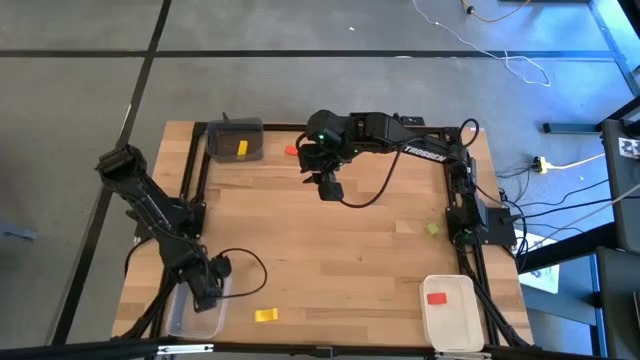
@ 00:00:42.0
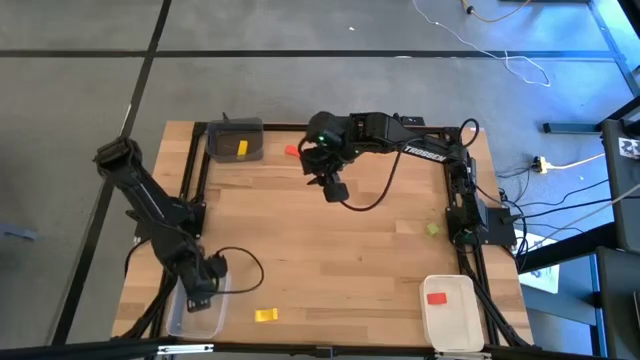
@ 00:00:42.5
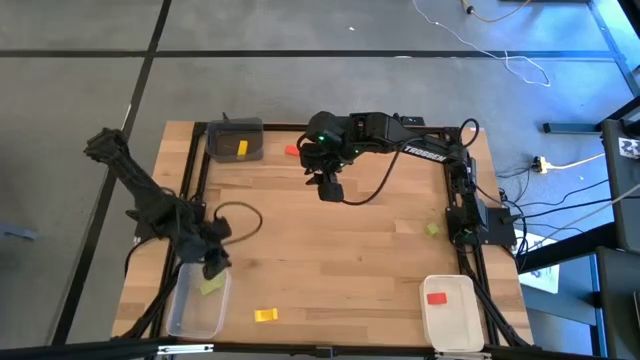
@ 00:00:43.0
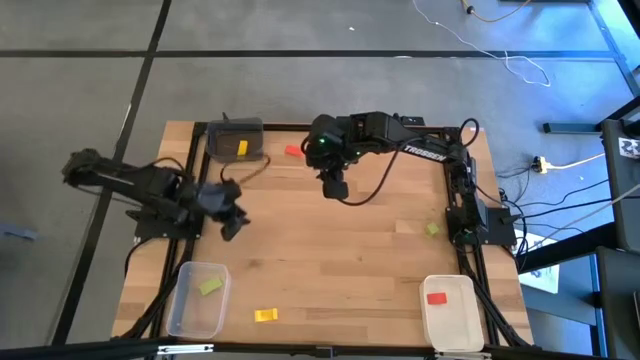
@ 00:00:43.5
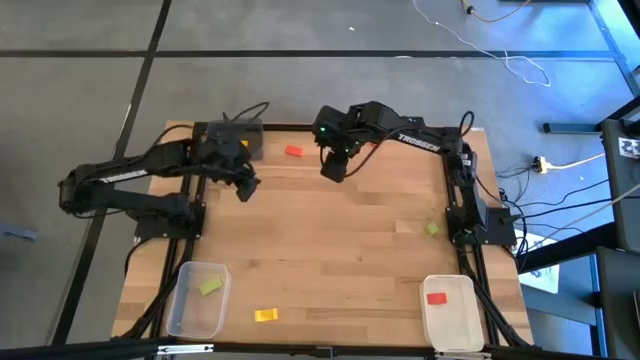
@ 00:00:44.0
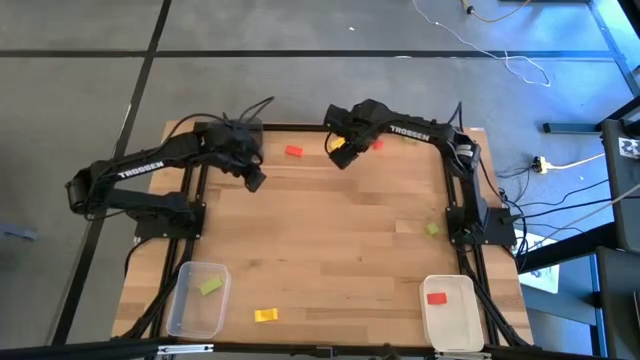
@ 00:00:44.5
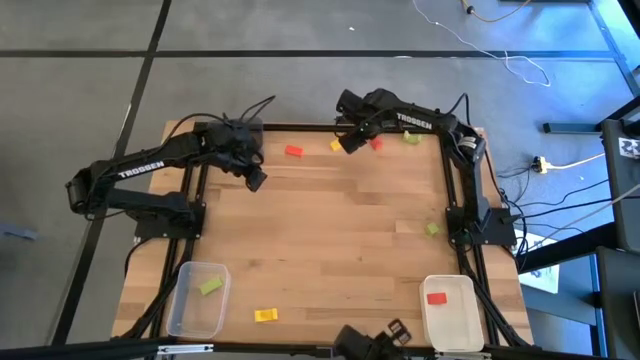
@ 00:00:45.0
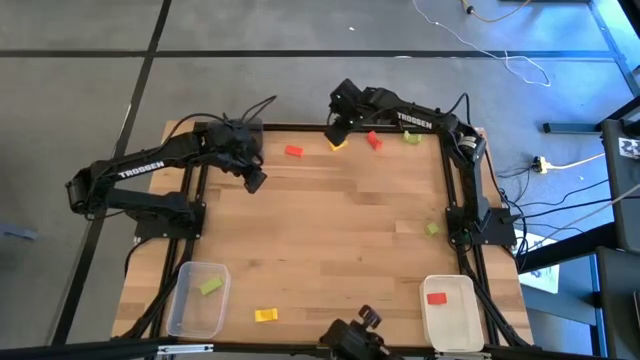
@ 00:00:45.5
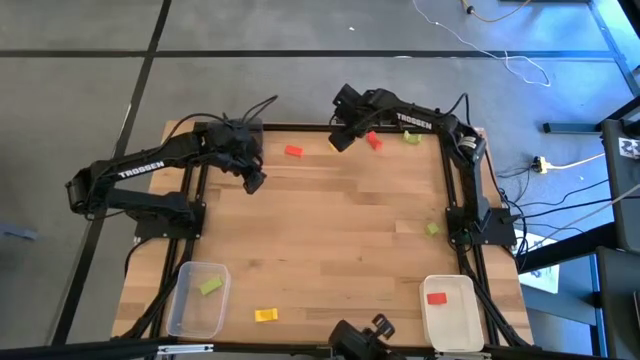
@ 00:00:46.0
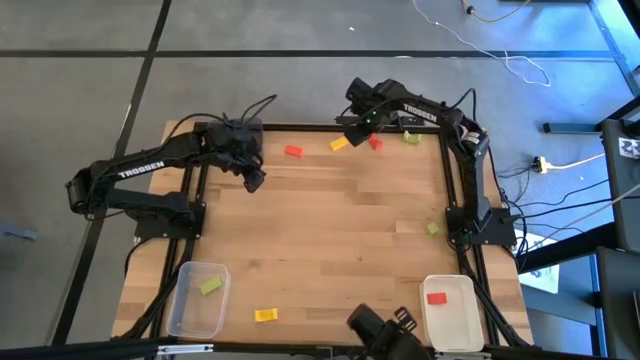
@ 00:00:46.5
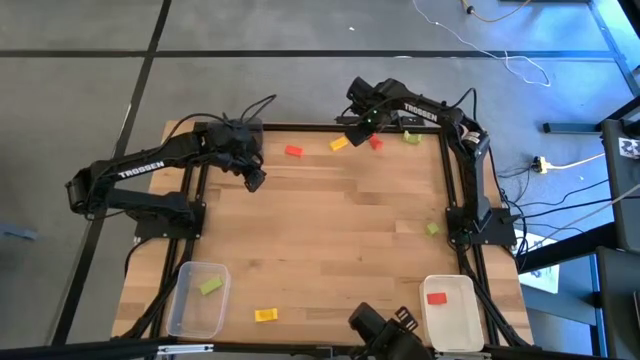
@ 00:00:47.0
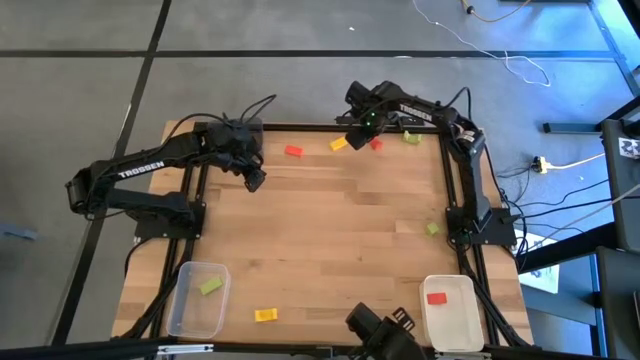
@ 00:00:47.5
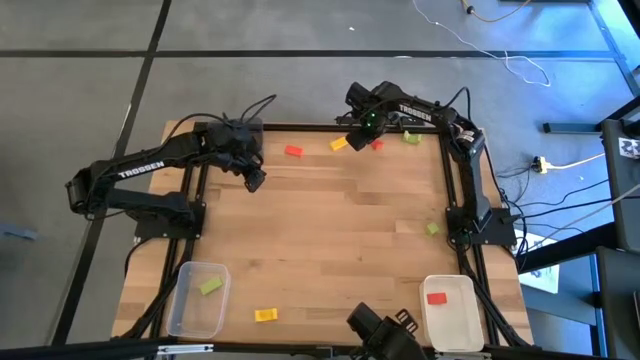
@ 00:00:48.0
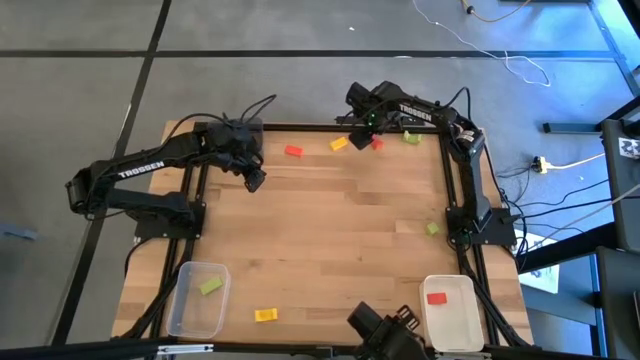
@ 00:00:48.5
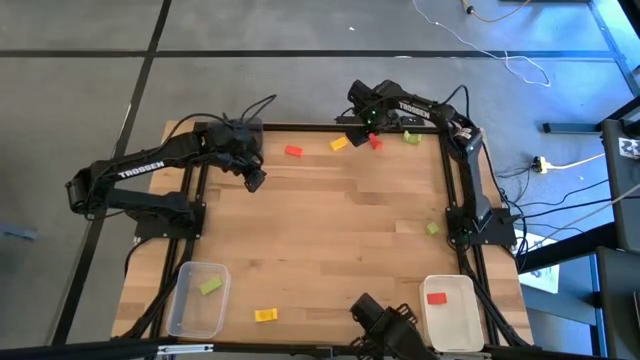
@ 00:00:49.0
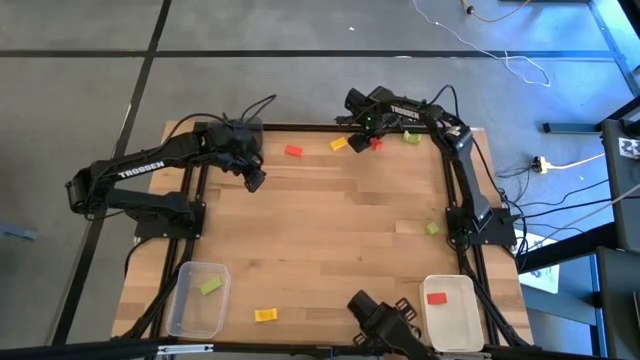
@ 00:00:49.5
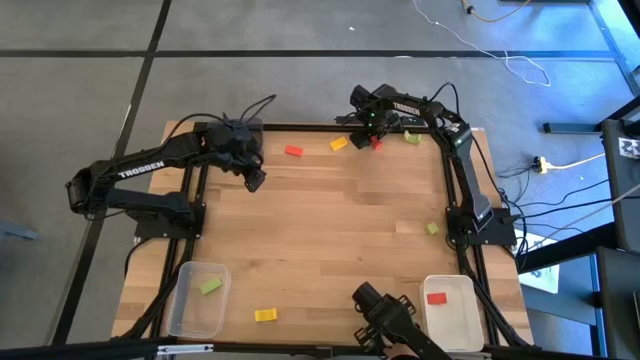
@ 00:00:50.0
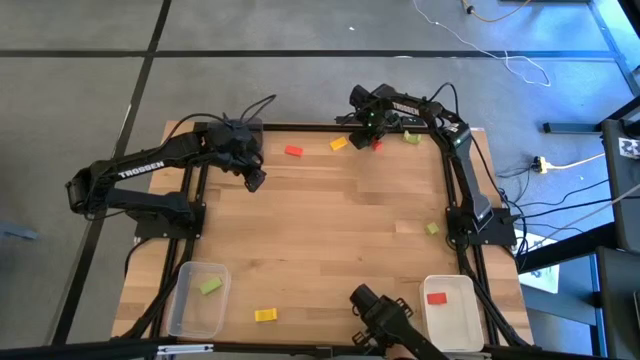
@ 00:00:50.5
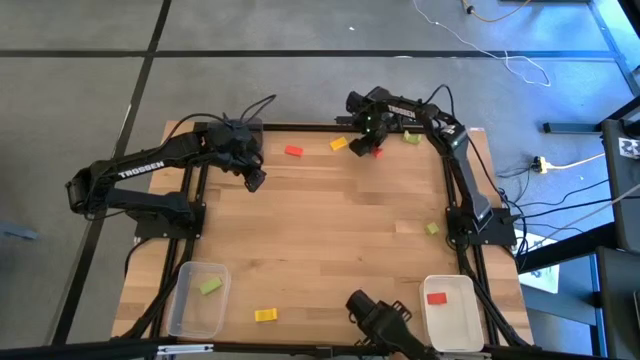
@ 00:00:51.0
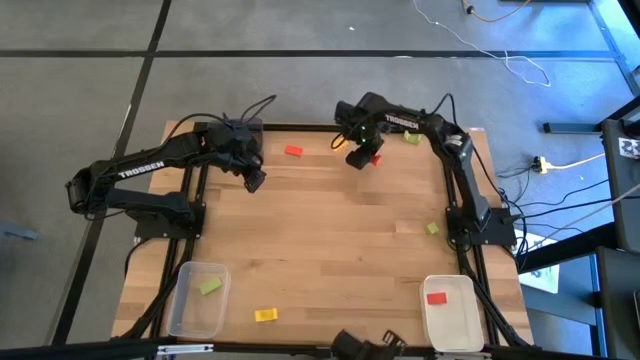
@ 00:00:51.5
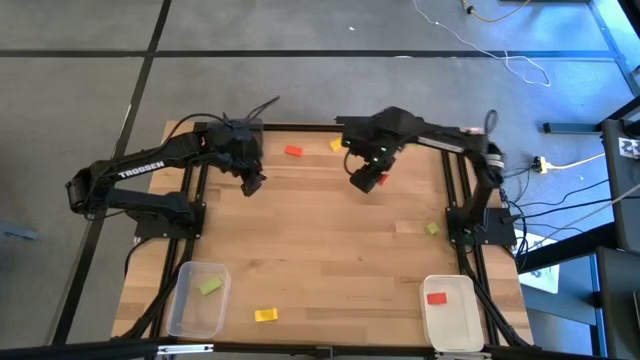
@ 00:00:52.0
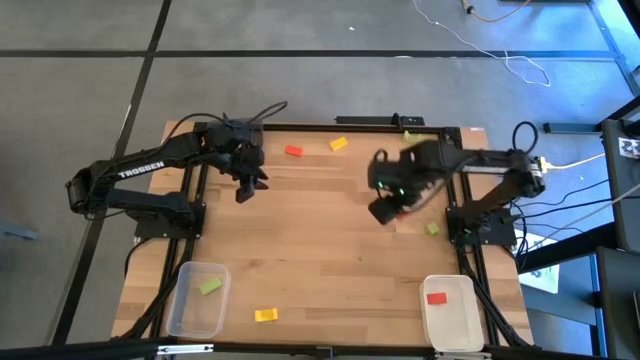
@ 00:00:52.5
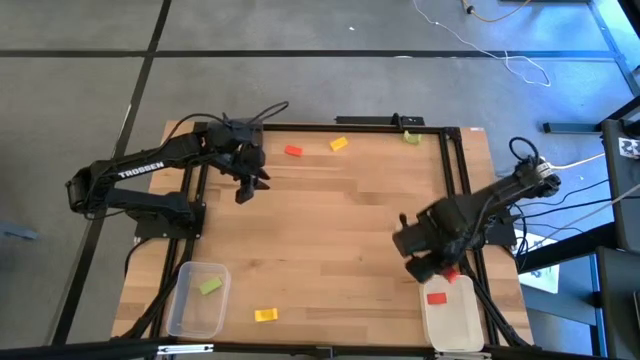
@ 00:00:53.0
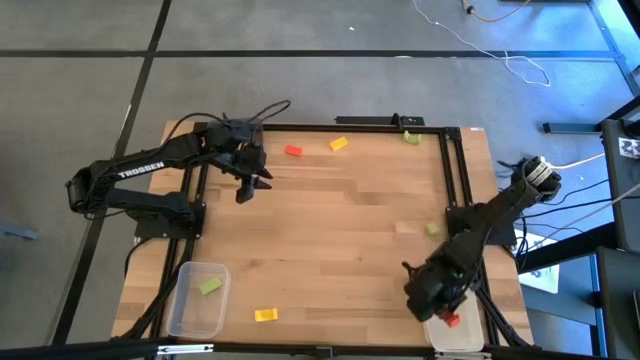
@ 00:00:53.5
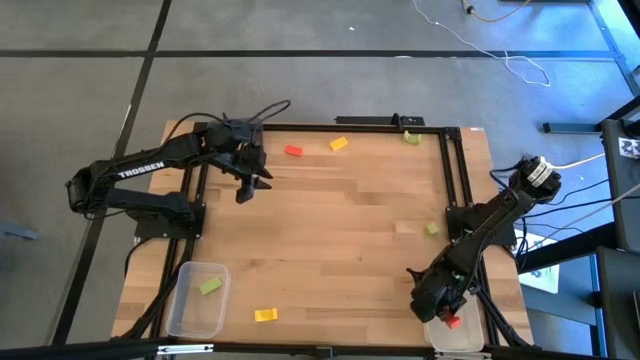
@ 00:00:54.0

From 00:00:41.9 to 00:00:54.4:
Task: Sort & place blocks by color
Put the right orange block into the white bin

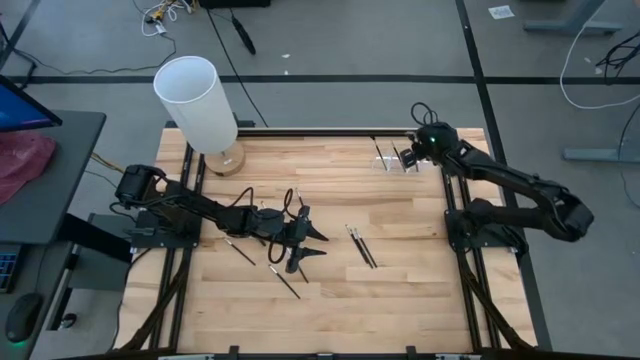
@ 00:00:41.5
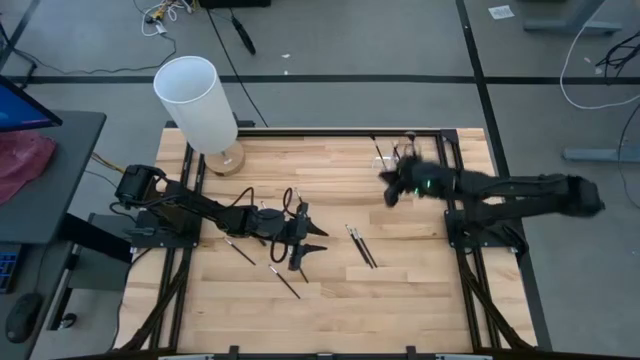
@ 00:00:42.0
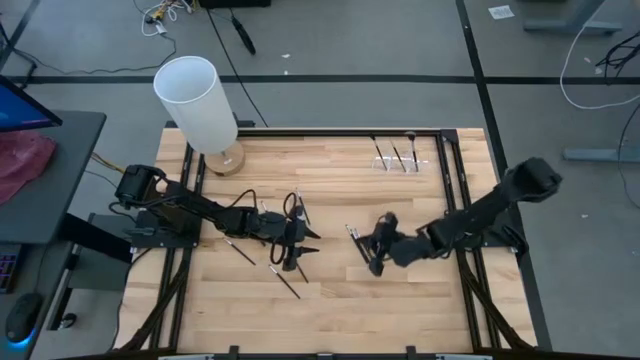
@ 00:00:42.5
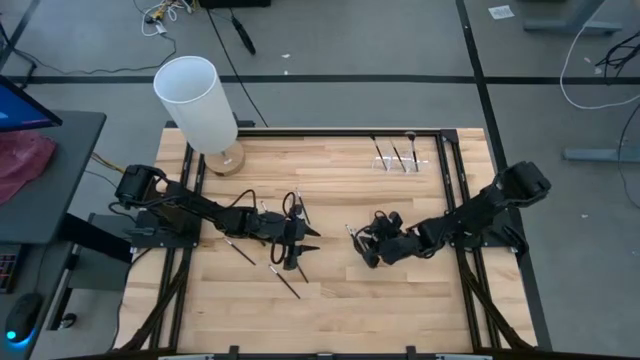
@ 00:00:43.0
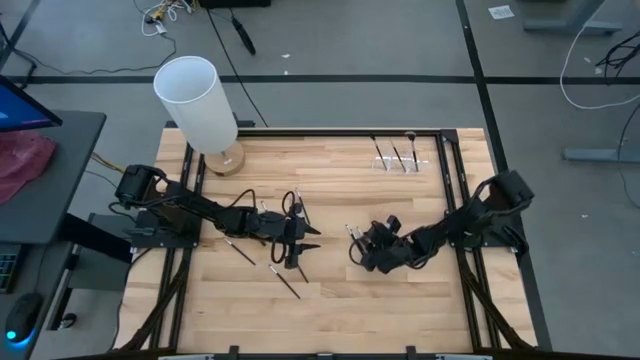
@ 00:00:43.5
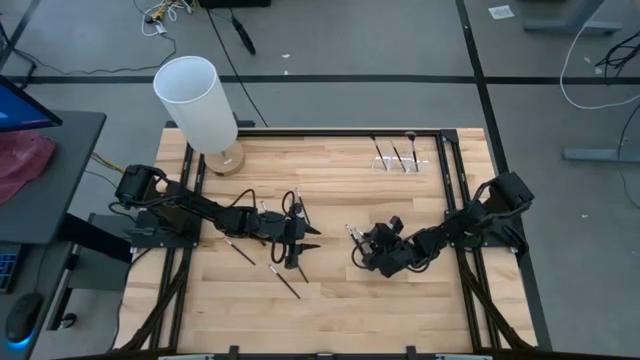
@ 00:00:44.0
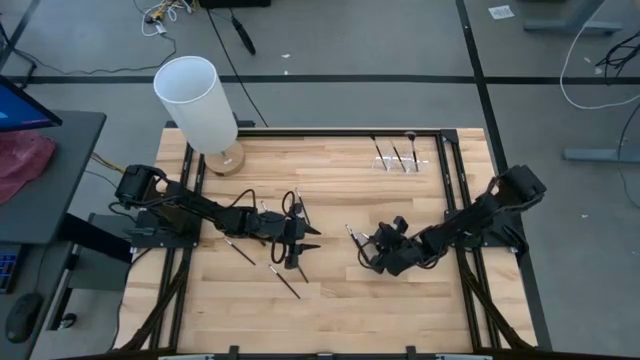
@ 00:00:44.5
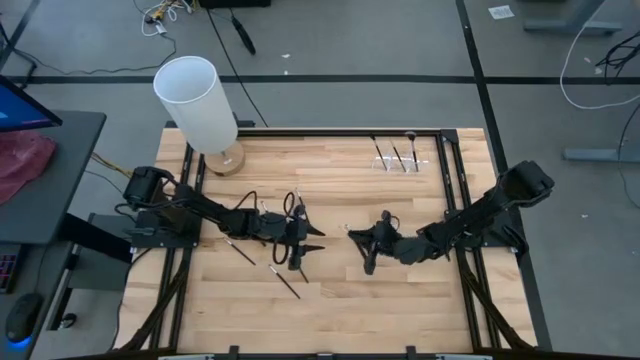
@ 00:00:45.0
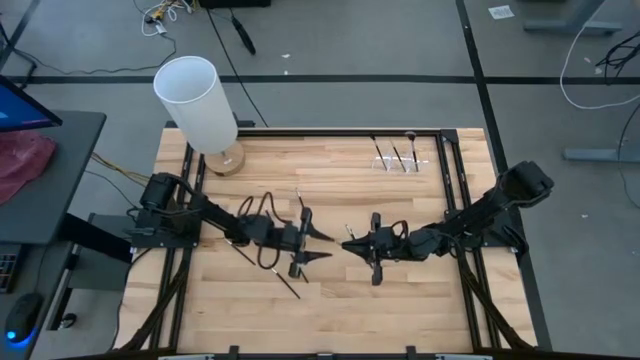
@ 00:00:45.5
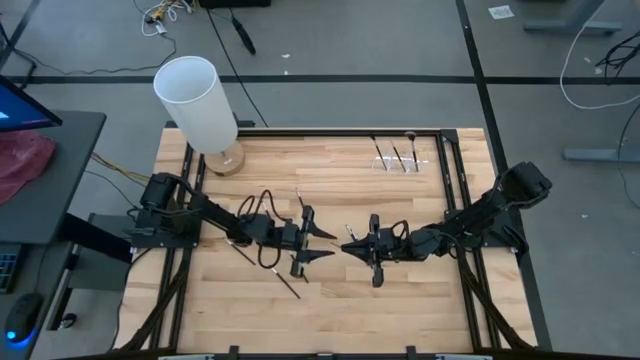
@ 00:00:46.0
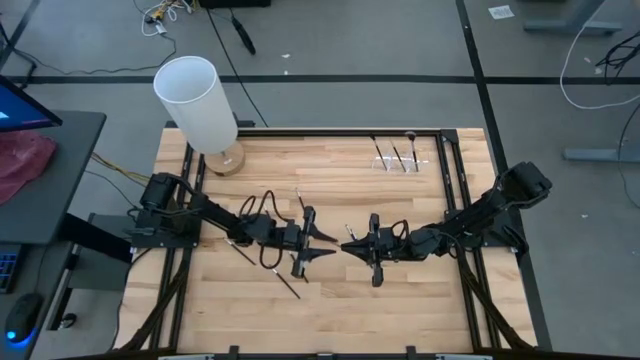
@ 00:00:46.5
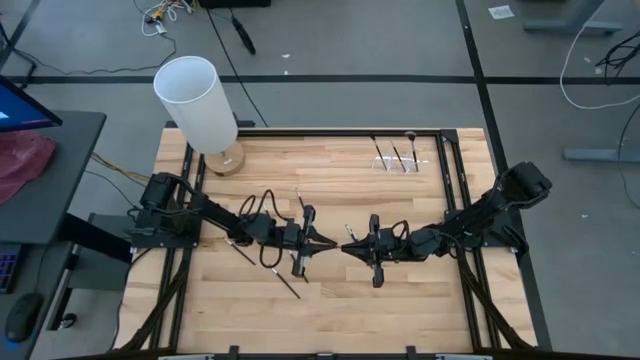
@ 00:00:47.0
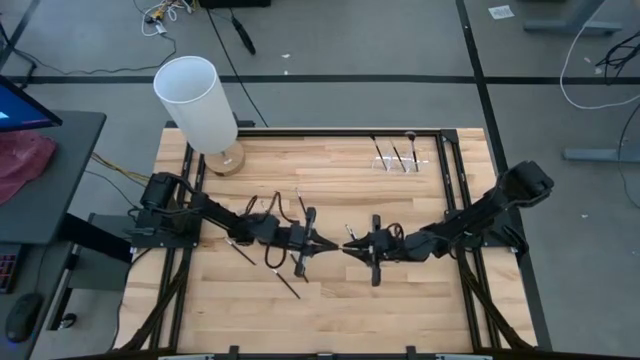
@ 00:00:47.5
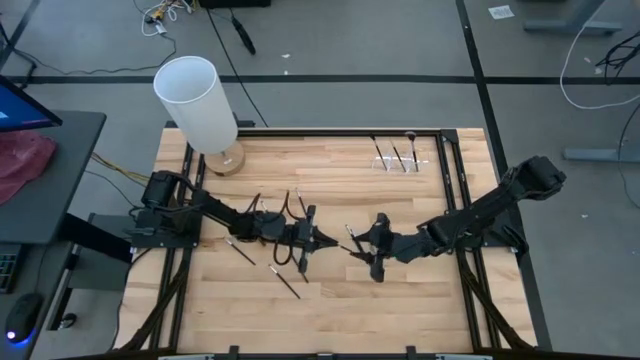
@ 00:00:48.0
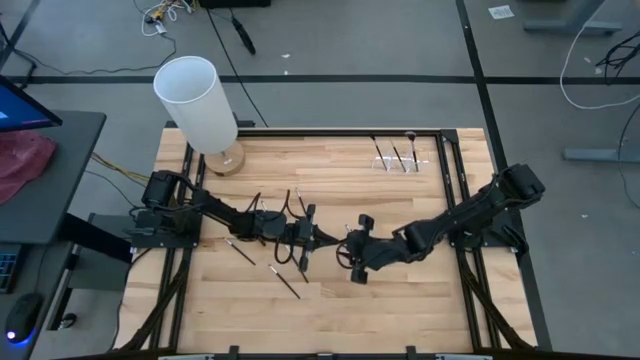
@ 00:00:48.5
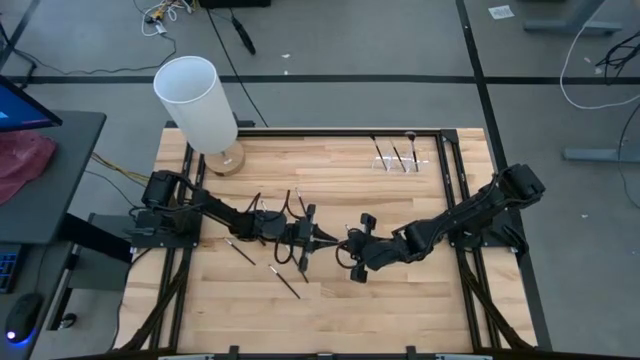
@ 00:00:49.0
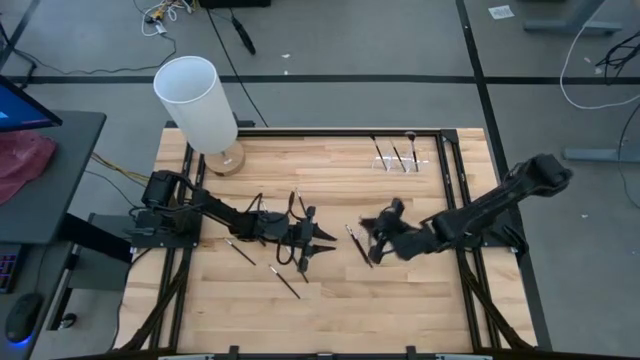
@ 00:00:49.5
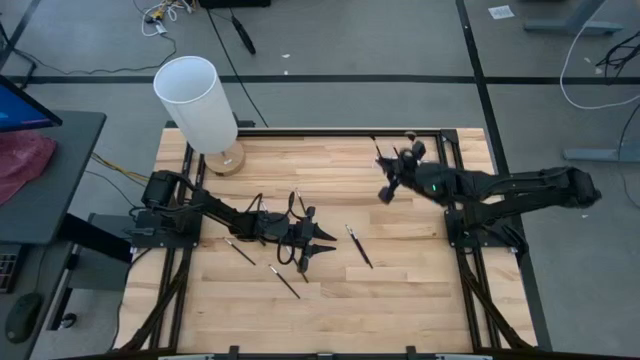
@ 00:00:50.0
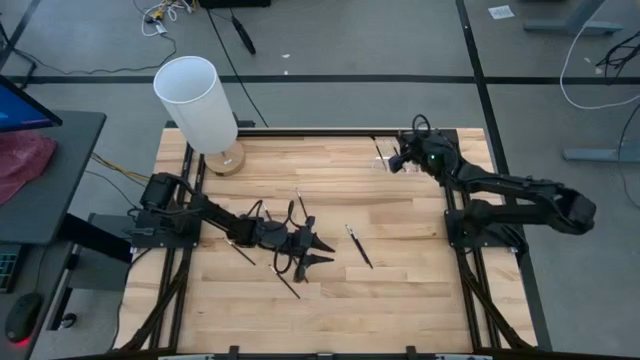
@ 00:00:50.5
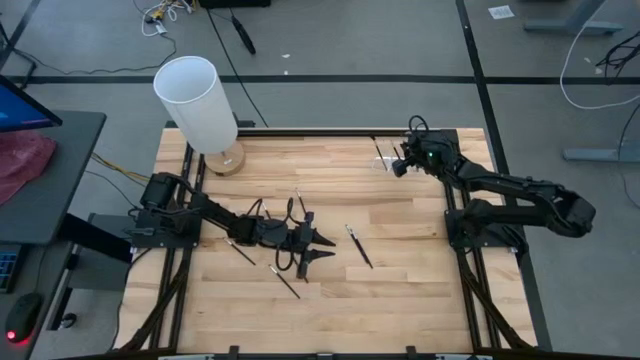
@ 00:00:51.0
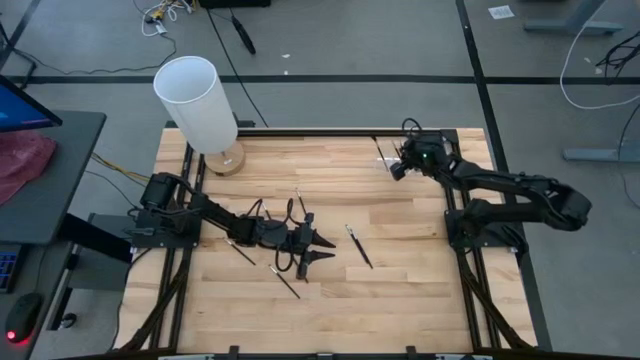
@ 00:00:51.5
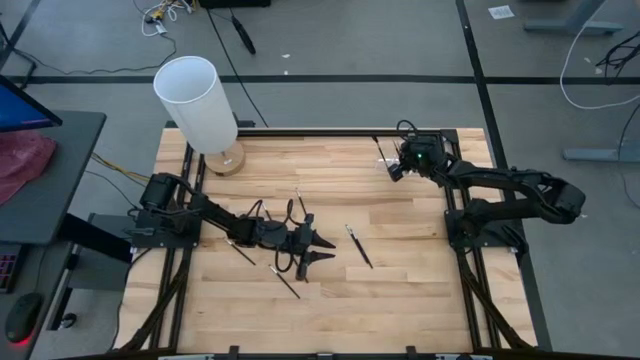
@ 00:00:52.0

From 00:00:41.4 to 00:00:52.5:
Task: Put items in baskets/containers
Put the eyeshadow brush into the transparent organizer
